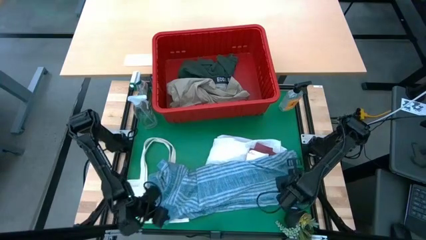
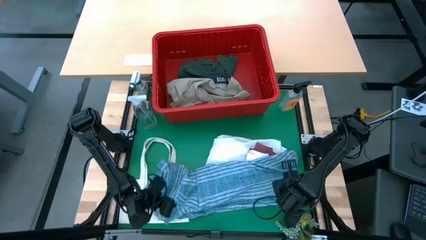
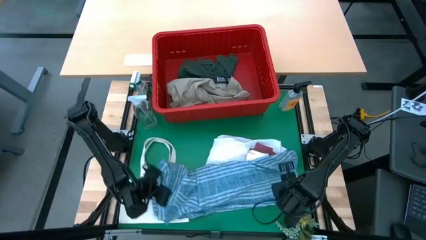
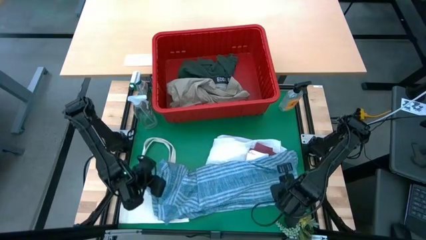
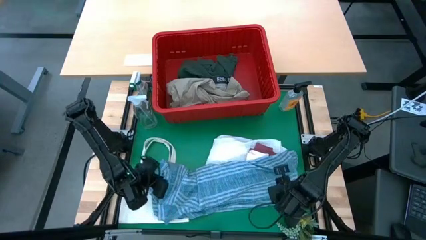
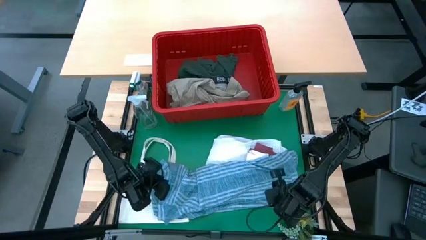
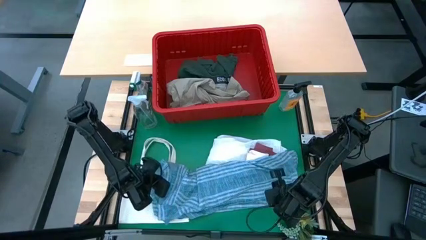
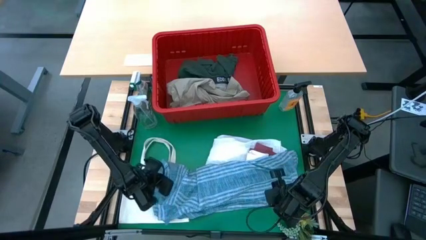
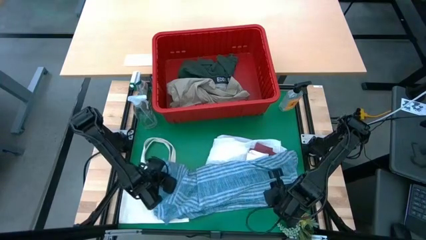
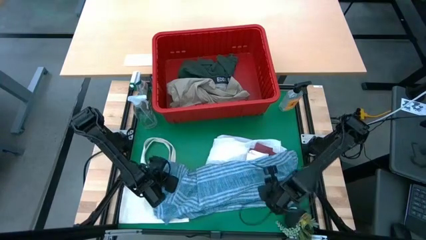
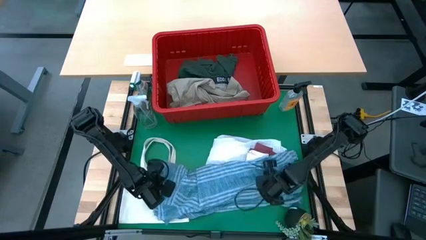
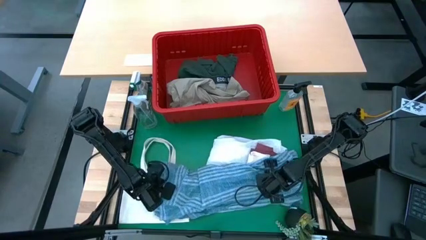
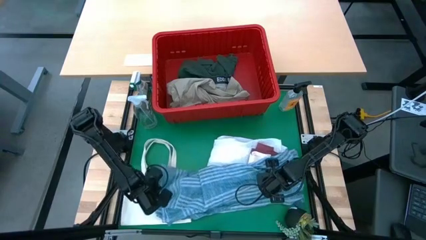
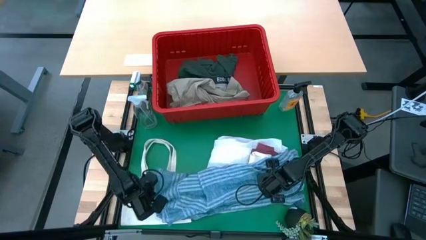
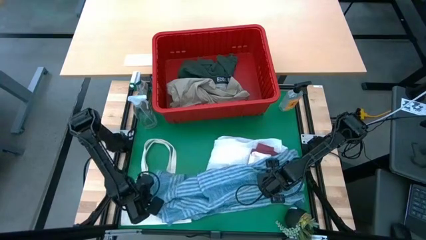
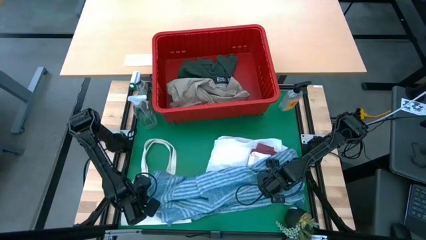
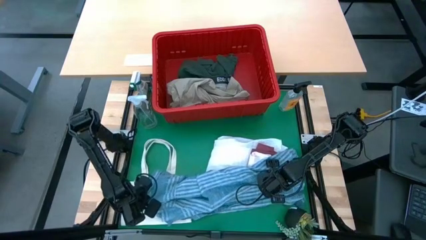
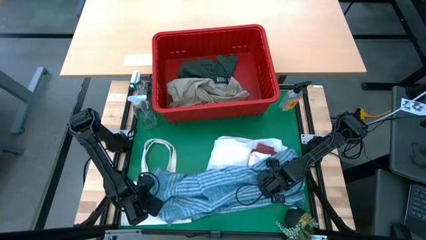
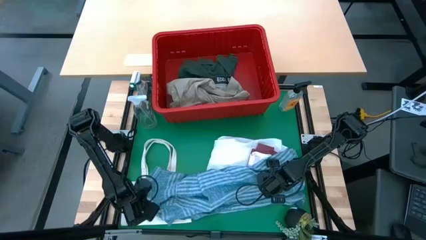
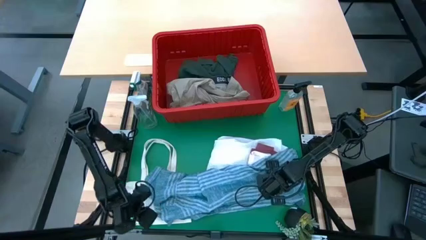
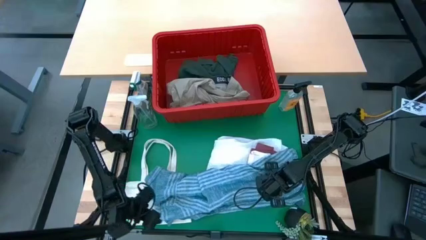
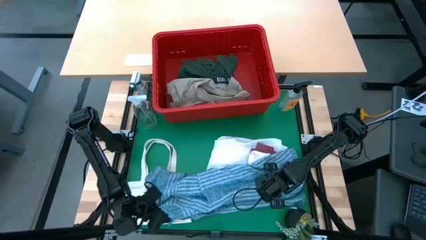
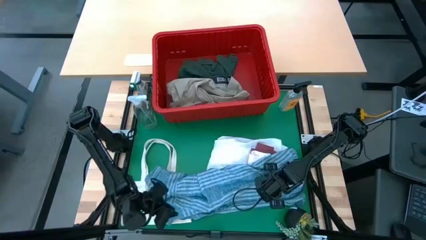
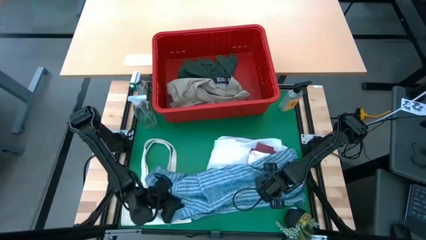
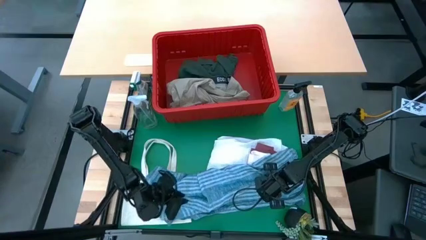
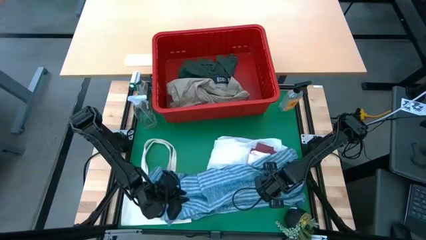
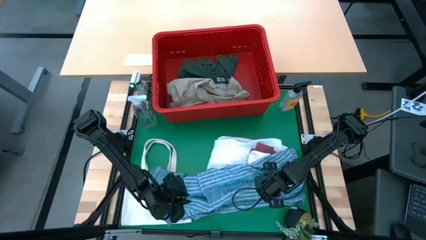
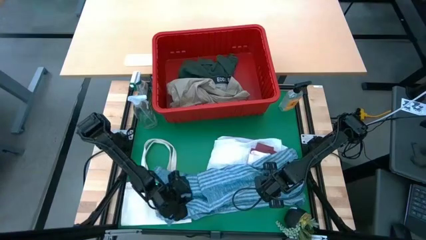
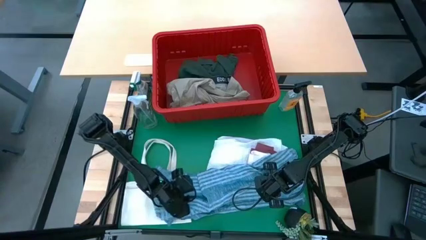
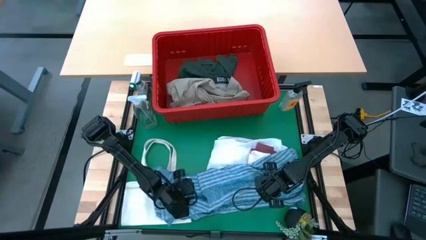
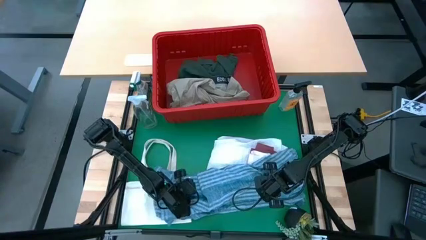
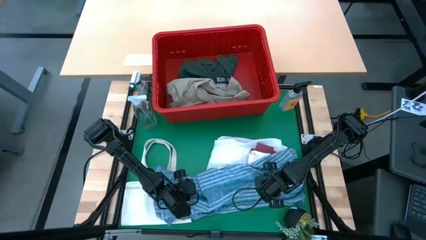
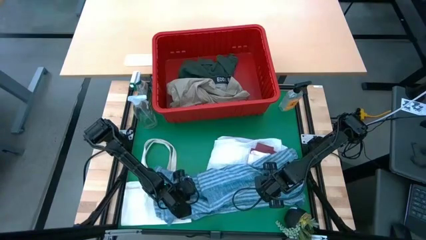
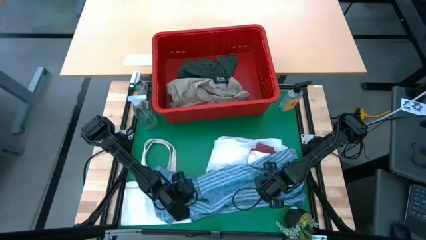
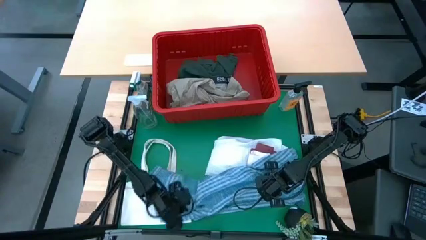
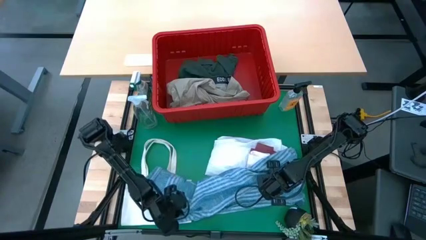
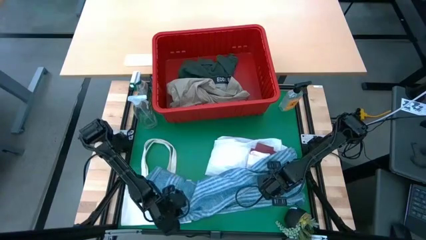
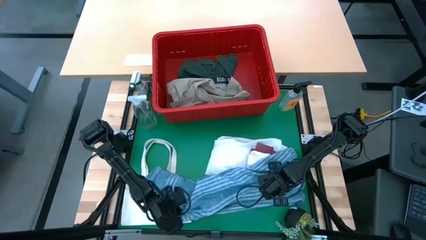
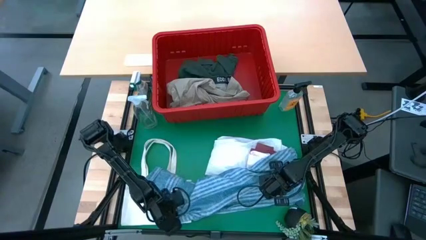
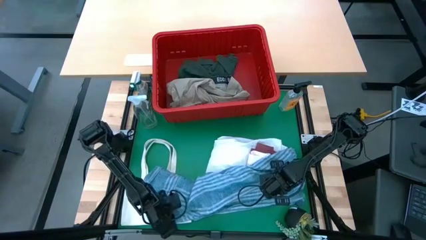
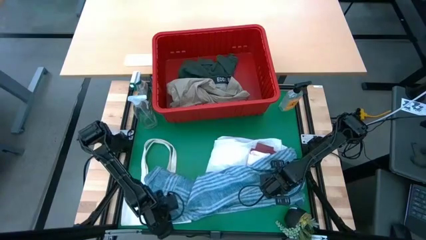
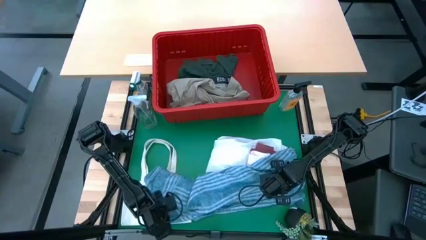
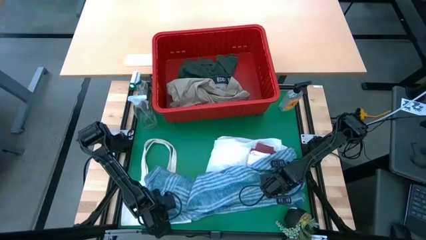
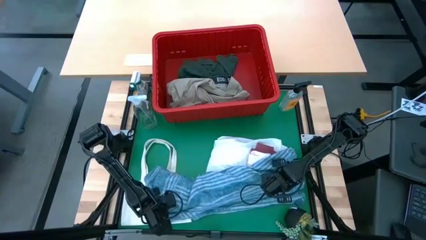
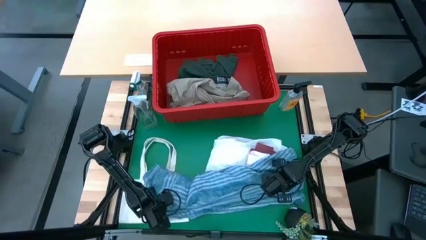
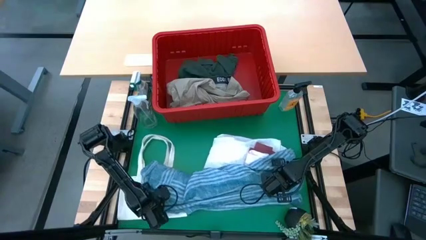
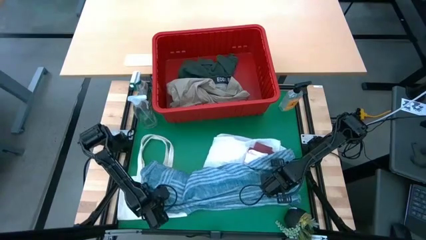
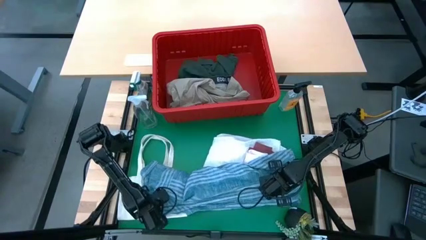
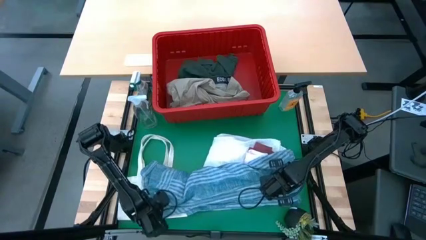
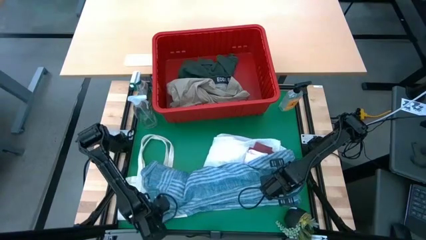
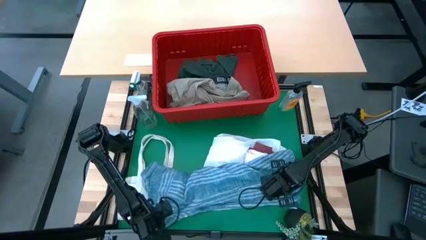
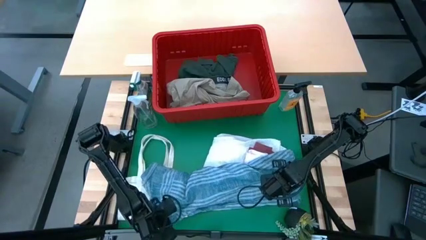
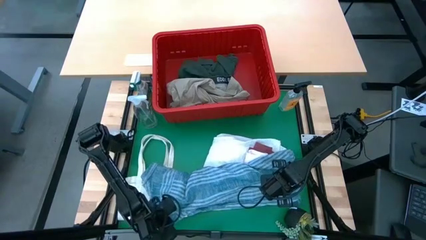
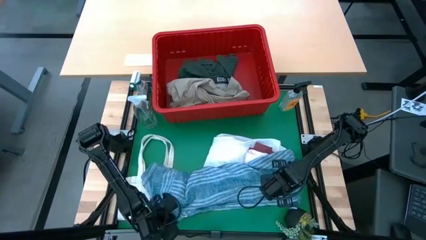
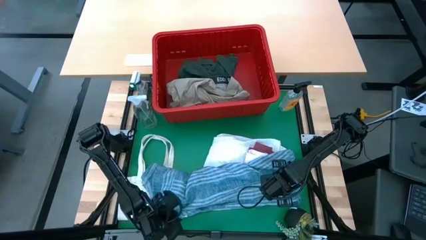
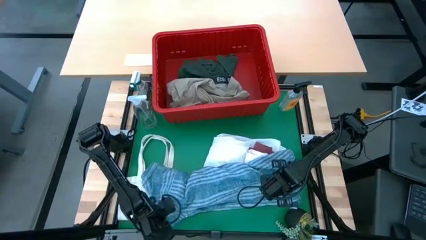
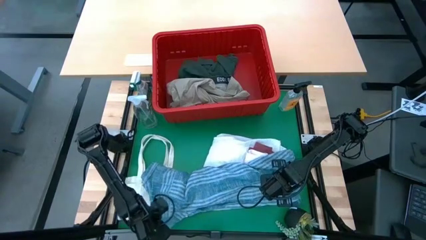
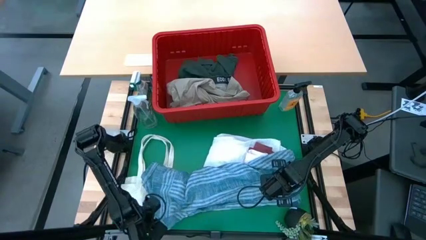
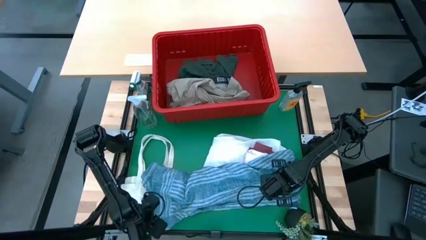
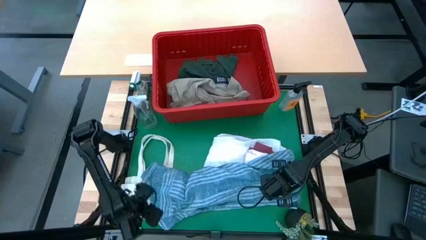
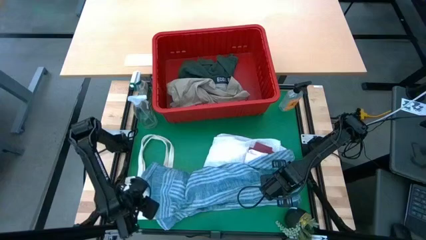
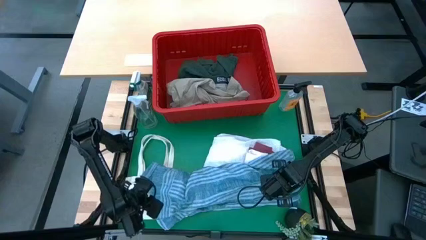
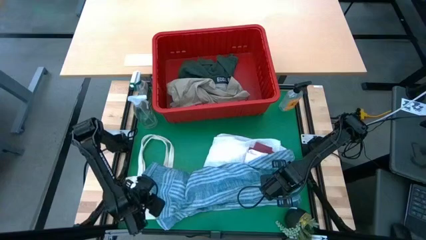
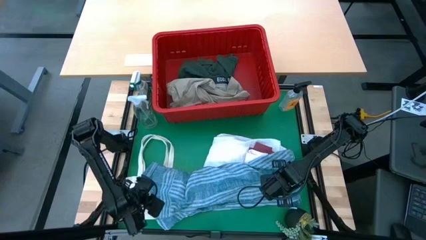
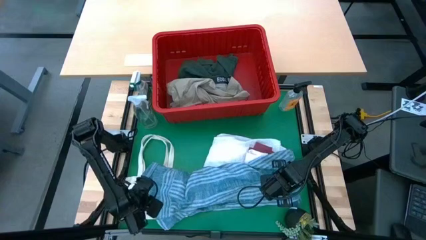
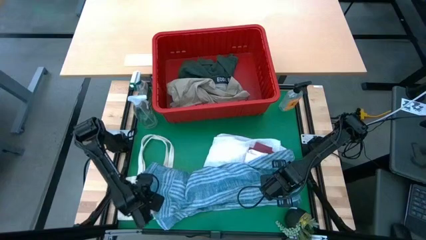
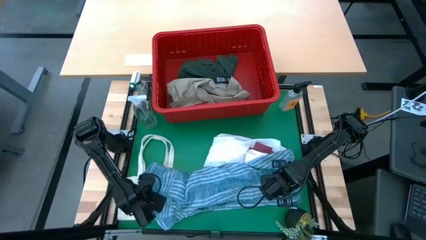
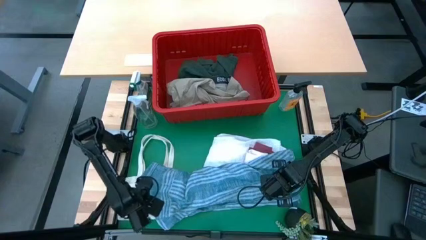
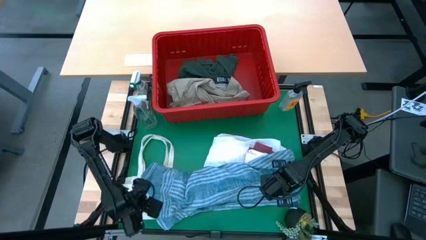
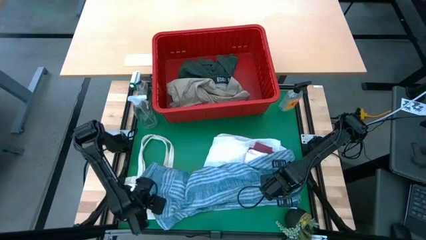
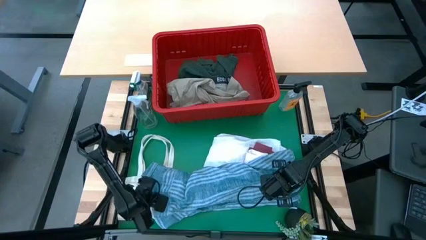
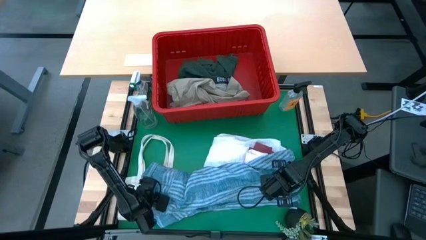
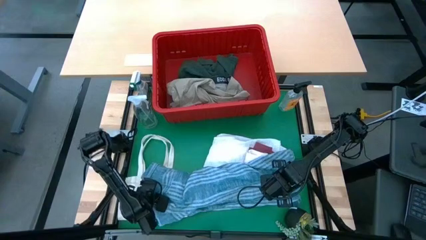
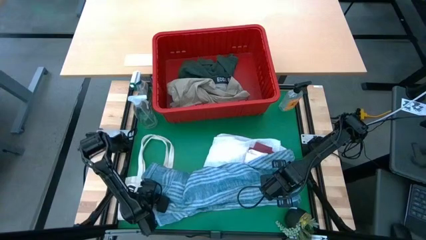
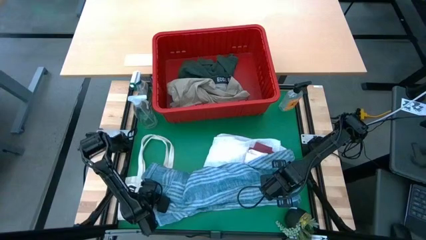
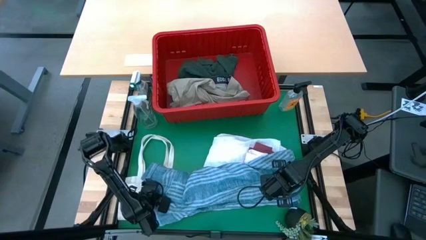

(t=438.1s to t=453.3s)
Task: Fold Laundry from Bin
Fold the blue checkered polo shirt
